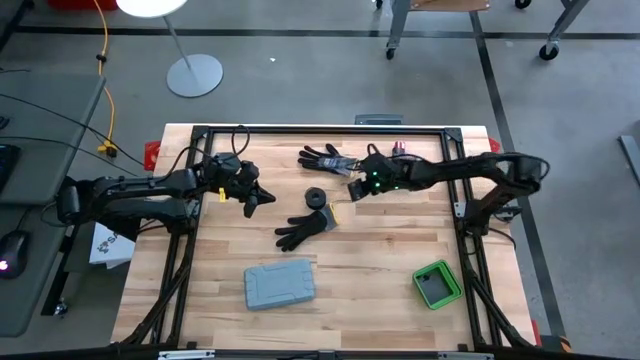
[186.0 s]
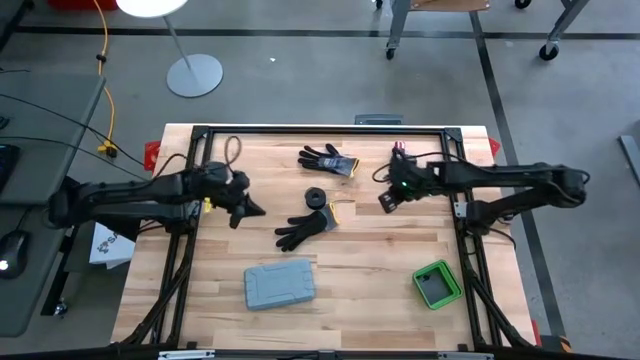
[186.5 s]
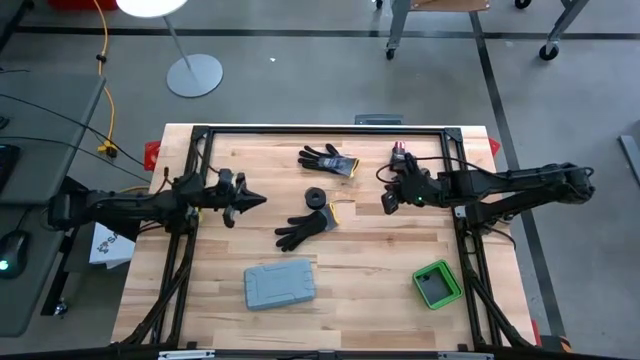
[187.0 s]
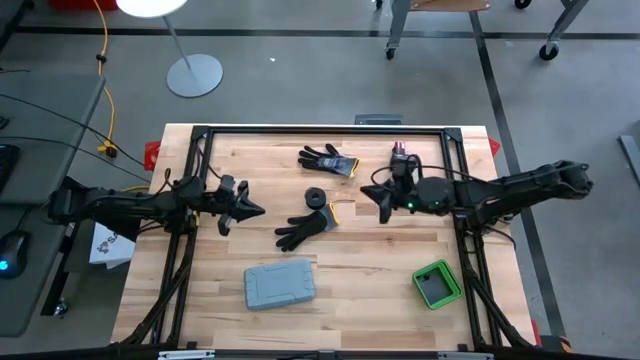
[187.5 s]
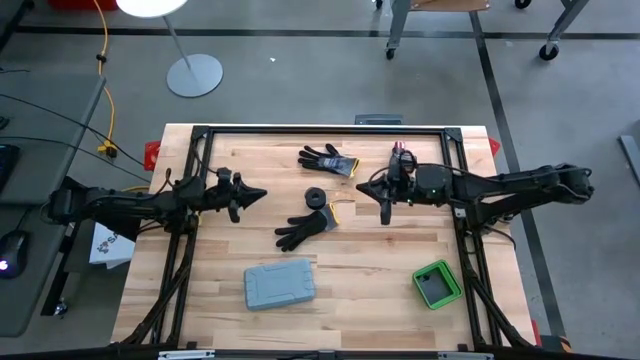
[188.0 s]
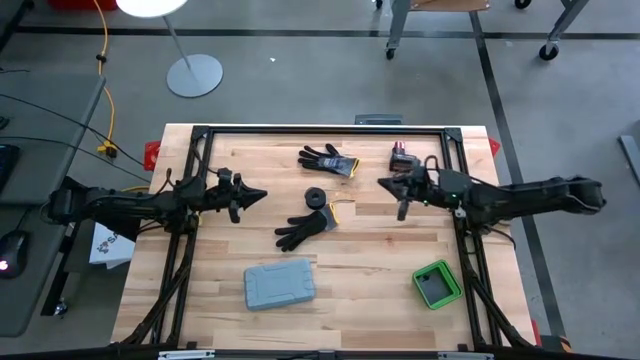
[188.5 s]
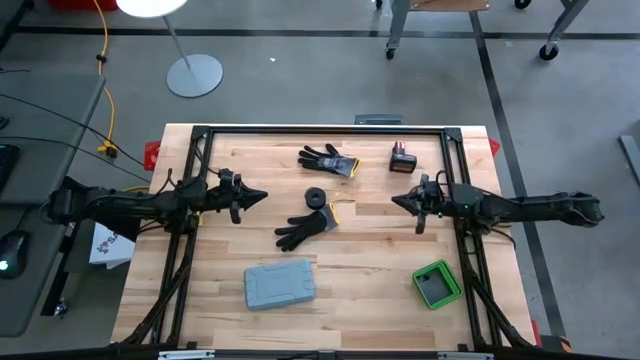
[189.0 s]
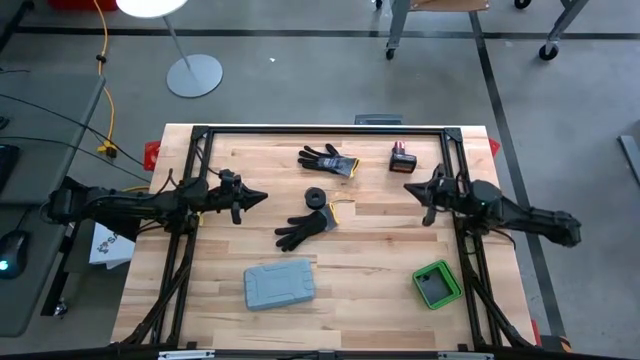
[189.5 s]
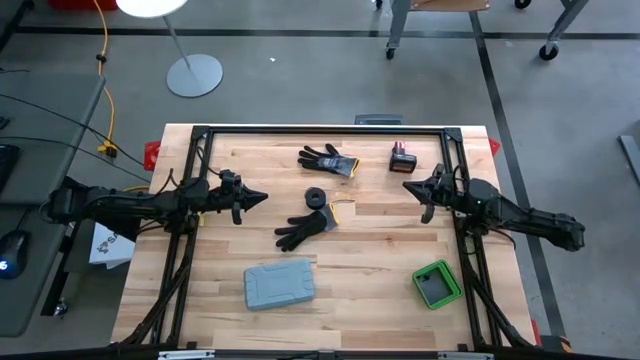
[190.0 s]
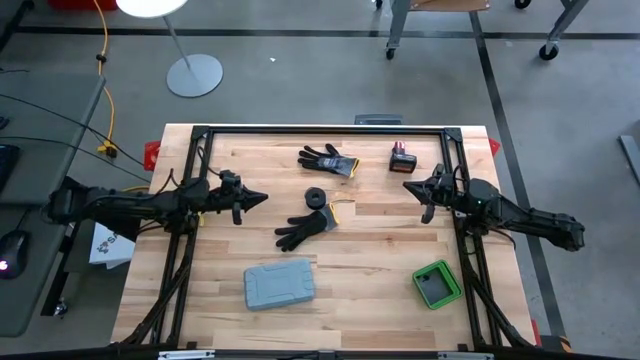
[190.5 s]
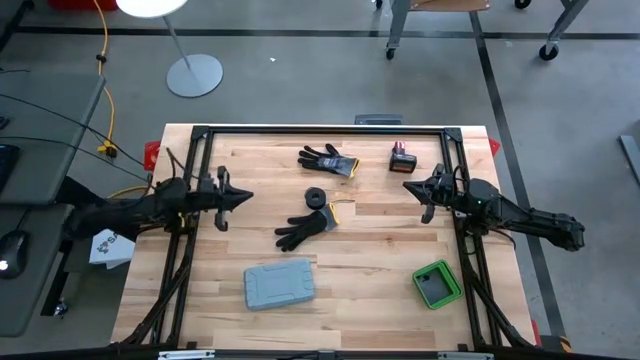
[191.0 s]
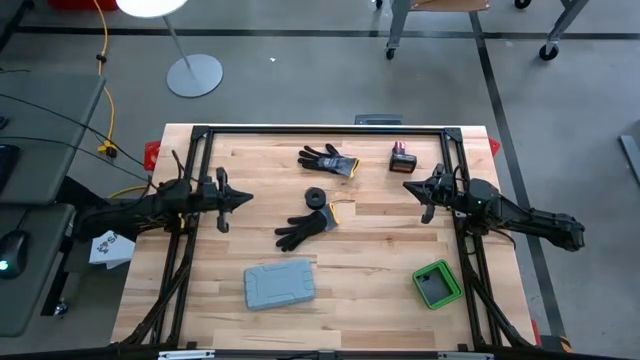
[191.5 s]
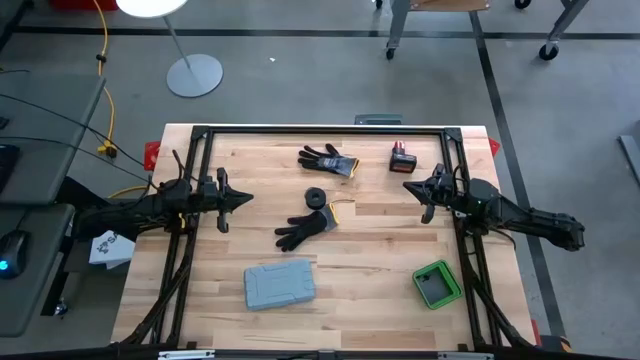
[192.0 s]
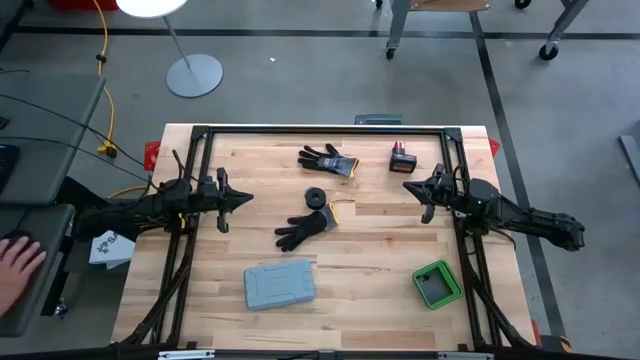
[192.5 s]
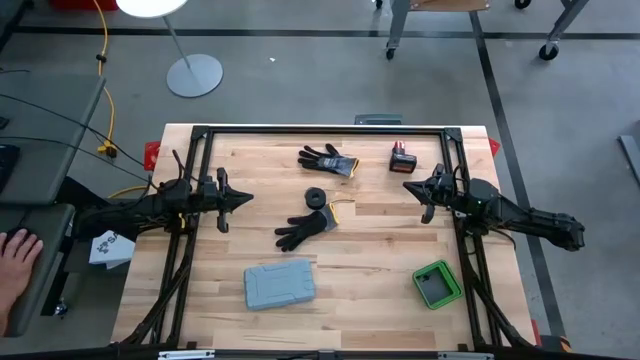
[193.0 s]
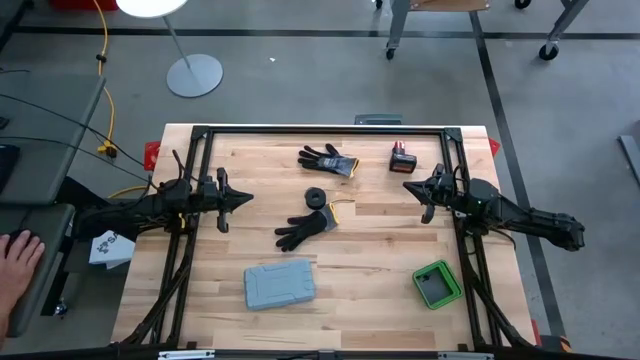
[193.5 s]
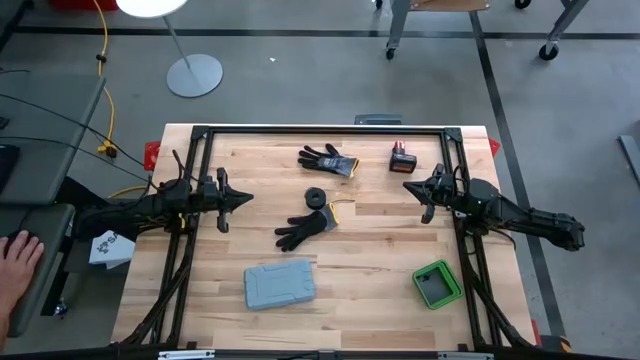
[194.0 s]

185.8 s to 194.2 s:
Task: Coil cords
Return to Home Position

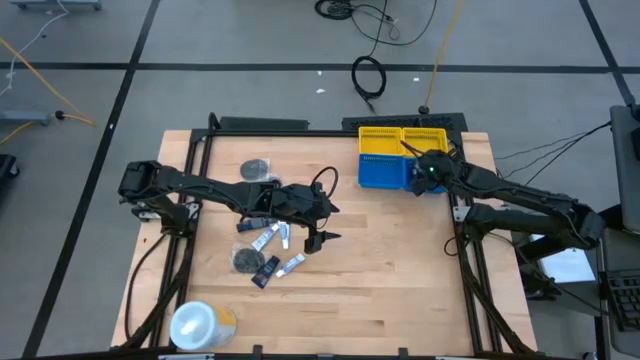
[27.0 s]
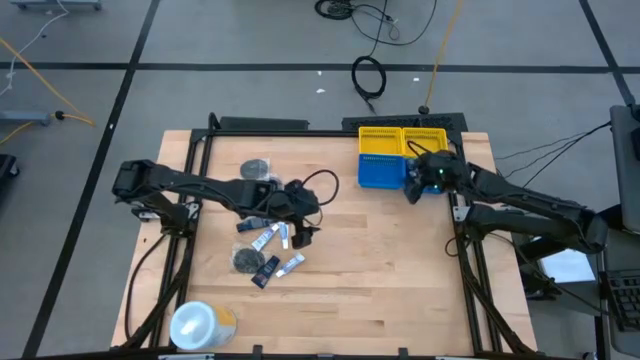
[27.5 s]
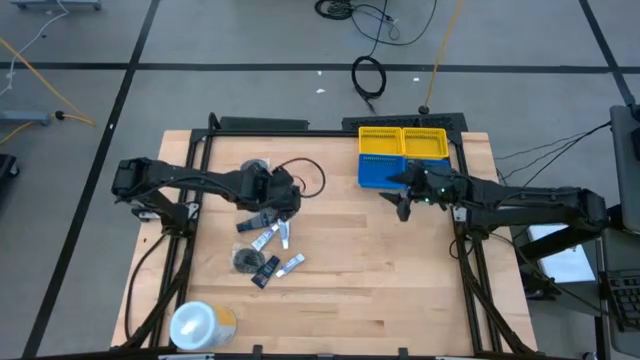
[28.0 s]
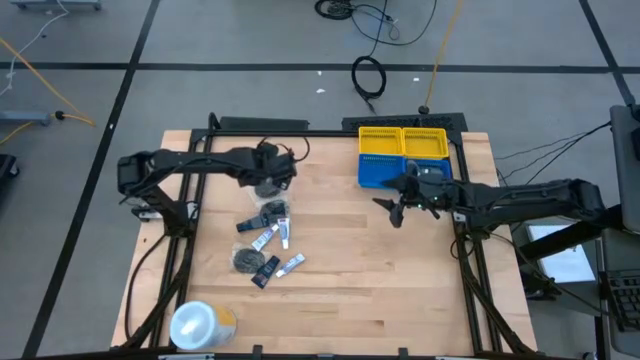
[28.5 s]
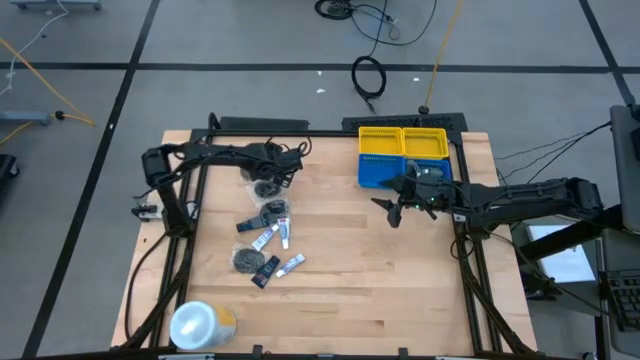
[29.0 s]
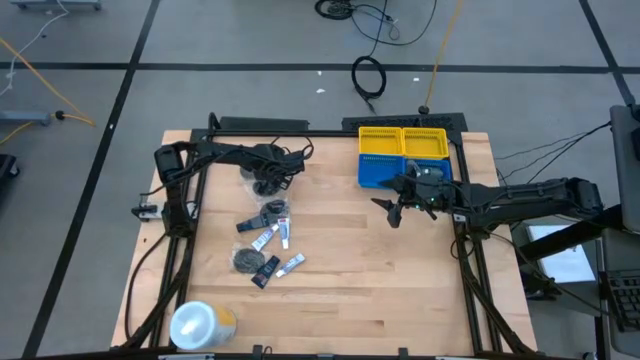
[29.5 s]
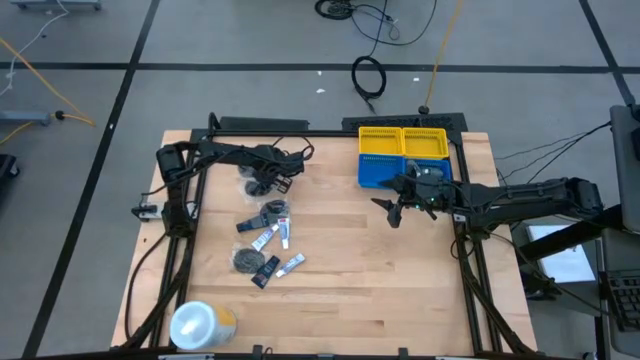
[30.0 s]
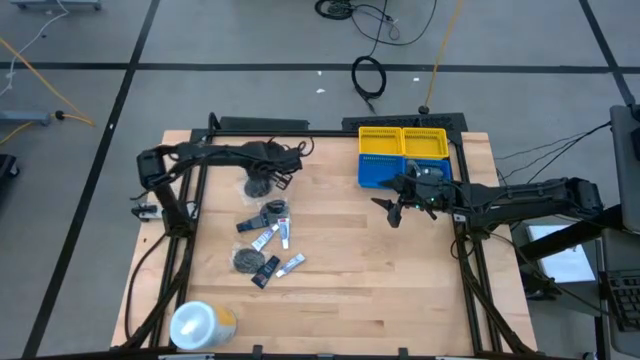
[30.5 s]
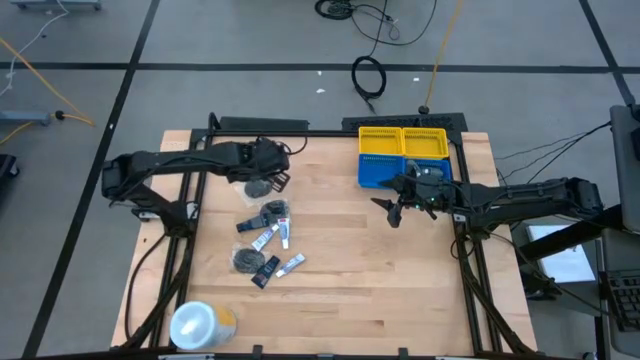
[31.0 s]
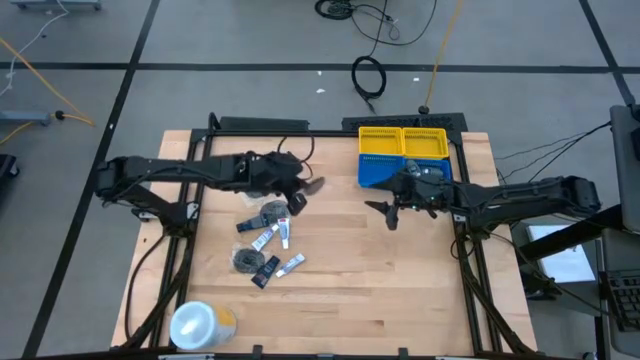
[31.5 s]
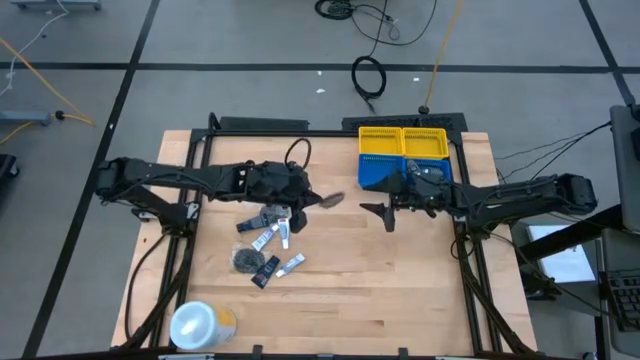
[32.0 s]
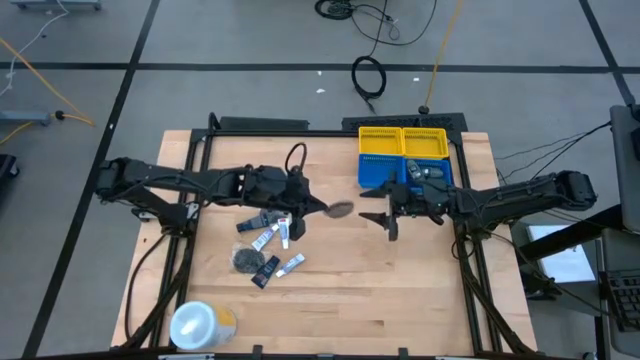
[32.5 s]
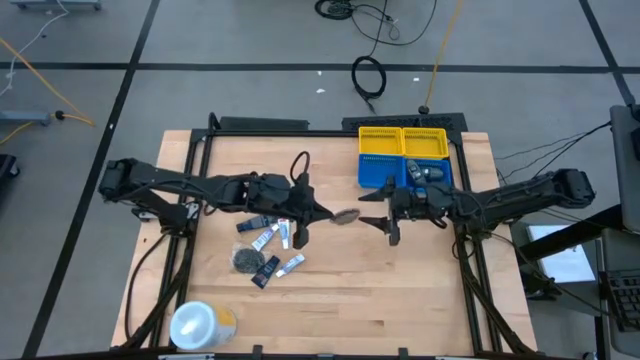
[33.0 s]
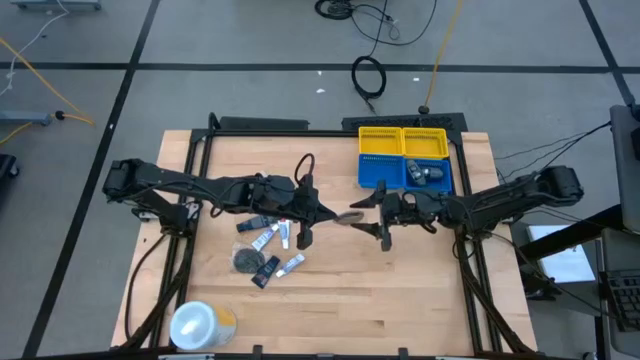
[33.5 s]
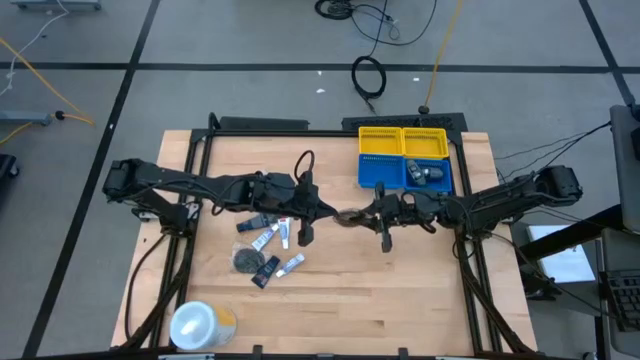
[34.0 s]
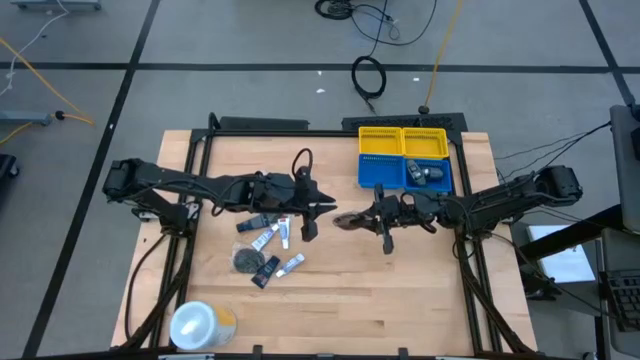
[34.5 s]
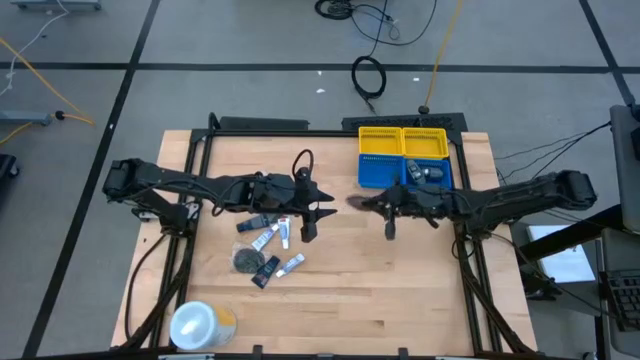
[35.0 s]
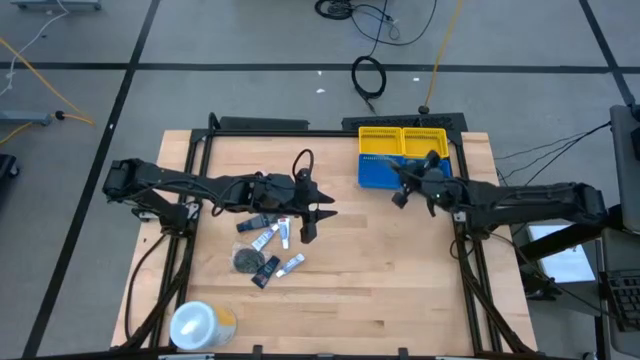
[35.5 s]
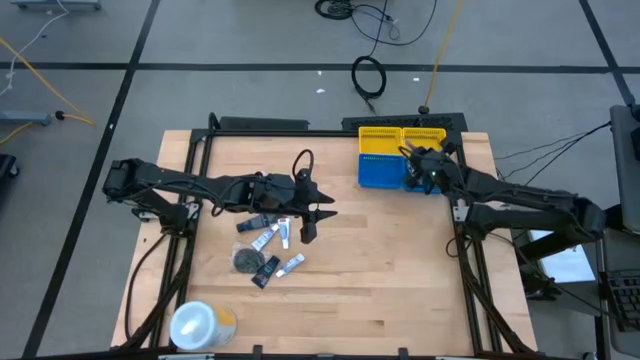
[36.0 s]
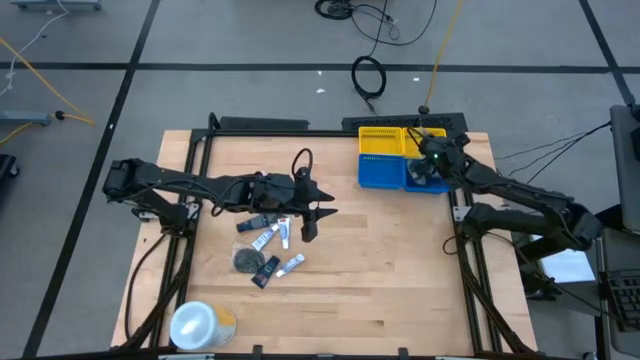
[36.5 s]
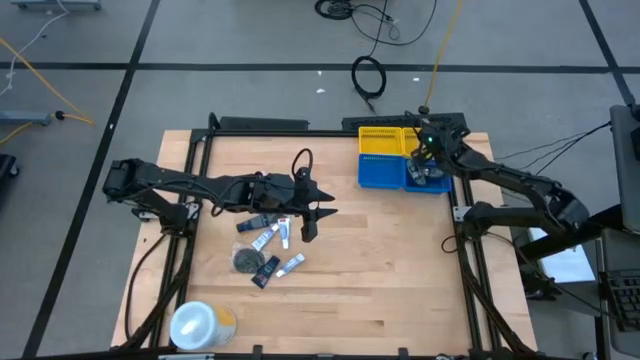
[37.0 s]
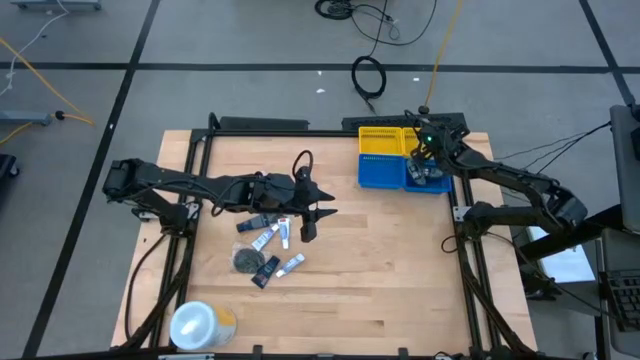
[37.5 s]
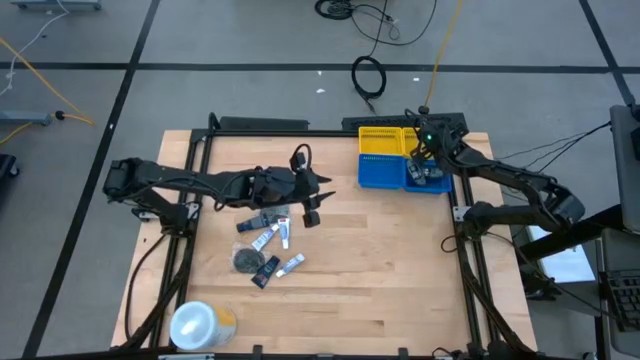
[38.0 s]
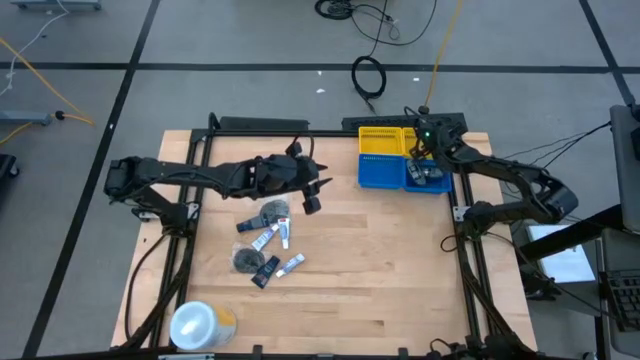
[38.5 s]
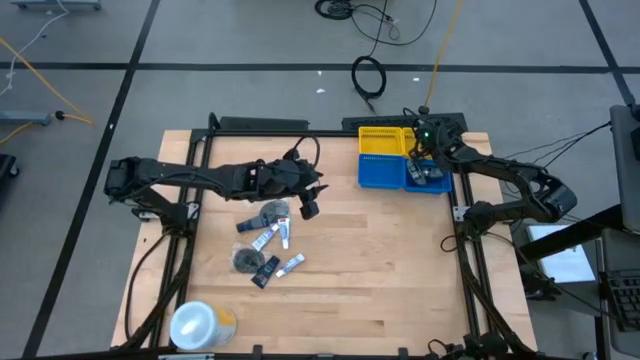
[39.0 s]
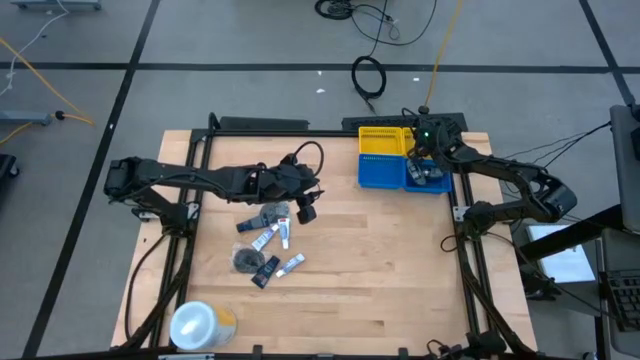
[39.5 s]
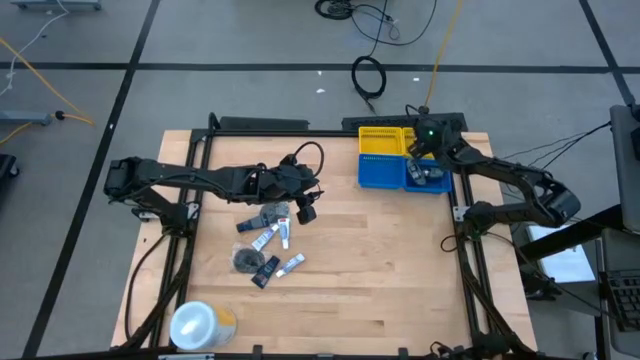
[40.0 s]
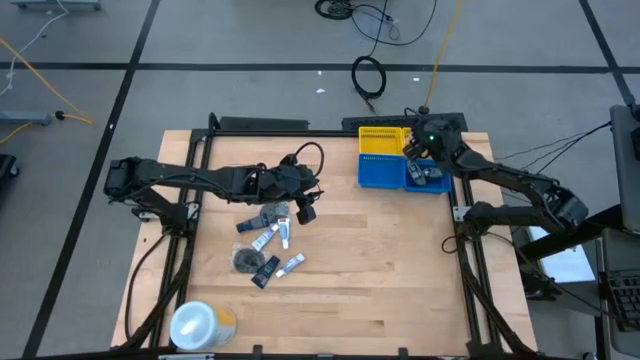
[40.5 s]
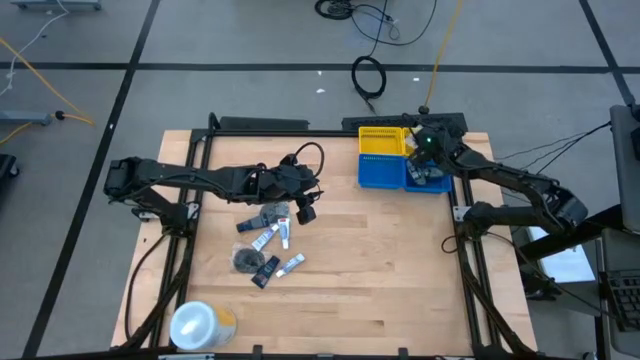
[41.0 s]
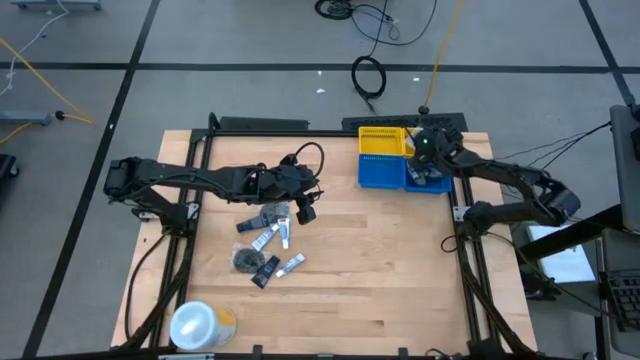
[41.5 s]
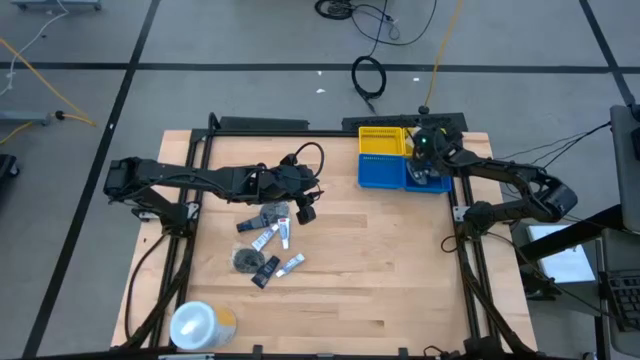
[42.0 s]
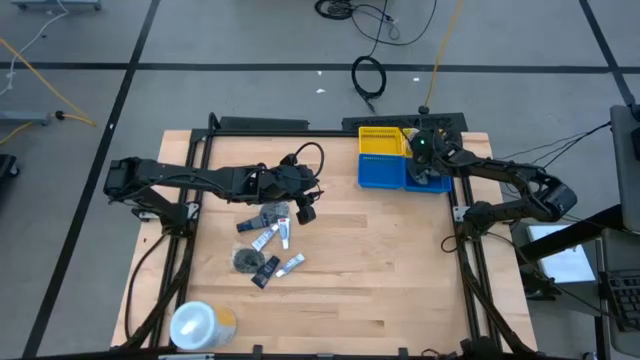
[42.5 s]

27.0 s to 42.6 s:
Task: Pick & Place Travel size toiletries
Put the black hairbrush into the right yellow basket
